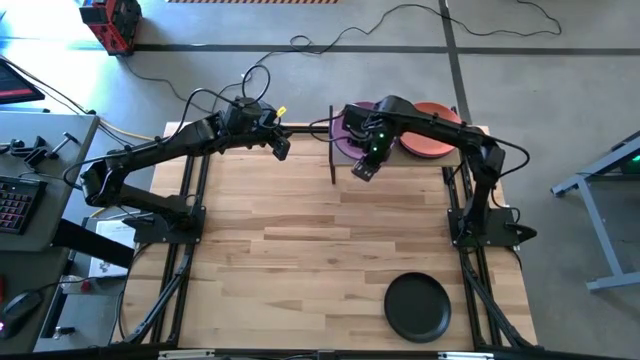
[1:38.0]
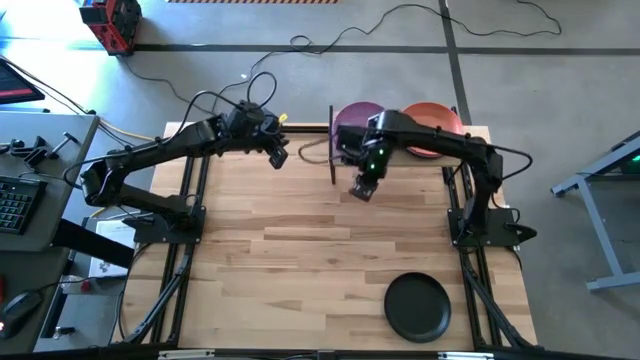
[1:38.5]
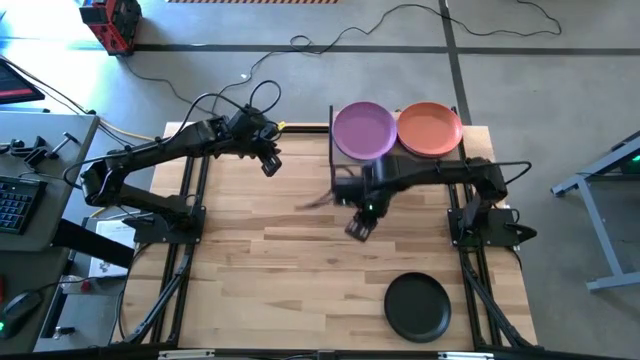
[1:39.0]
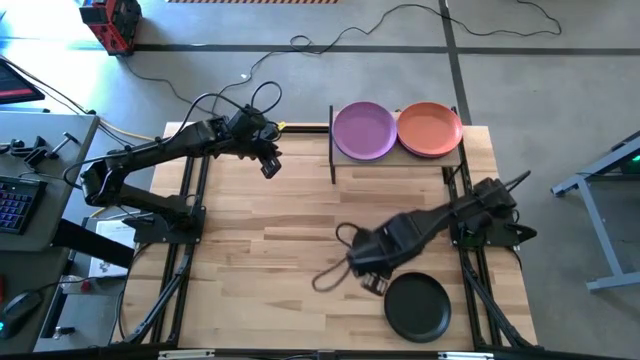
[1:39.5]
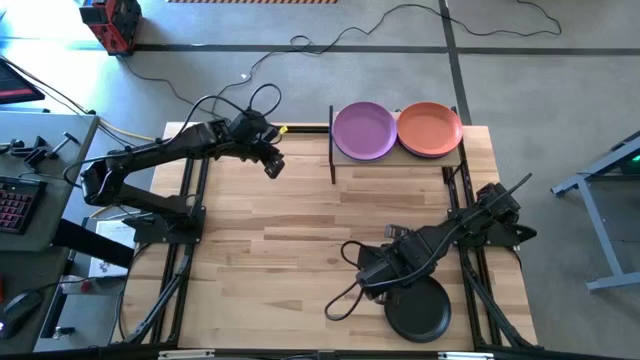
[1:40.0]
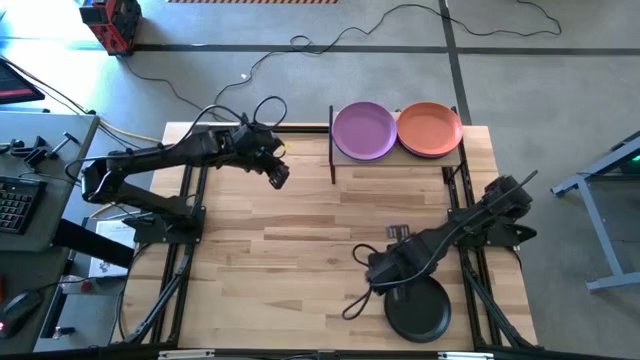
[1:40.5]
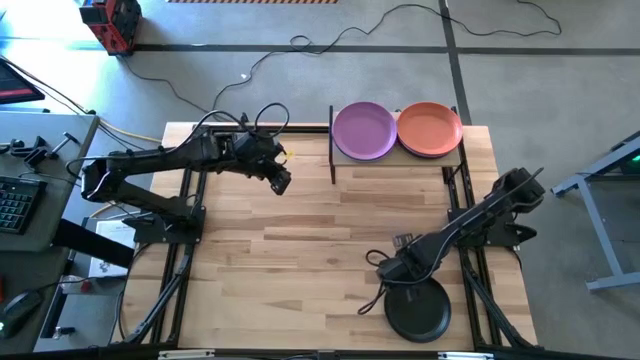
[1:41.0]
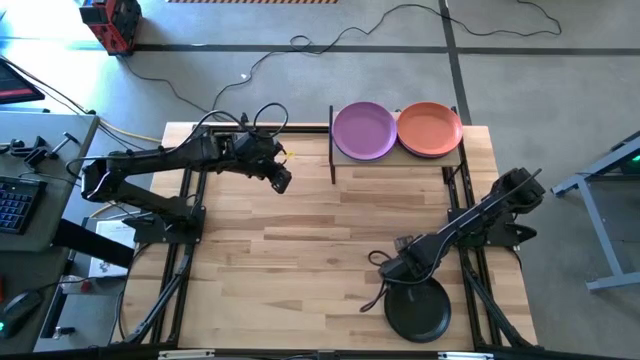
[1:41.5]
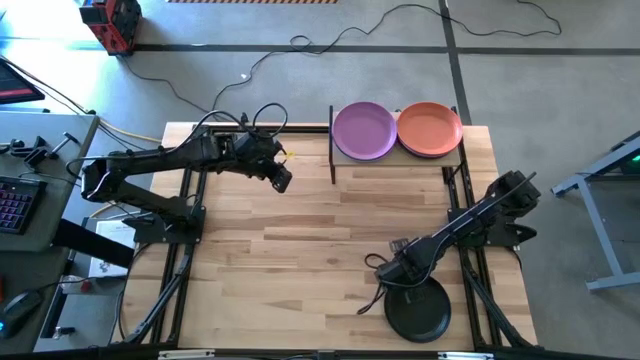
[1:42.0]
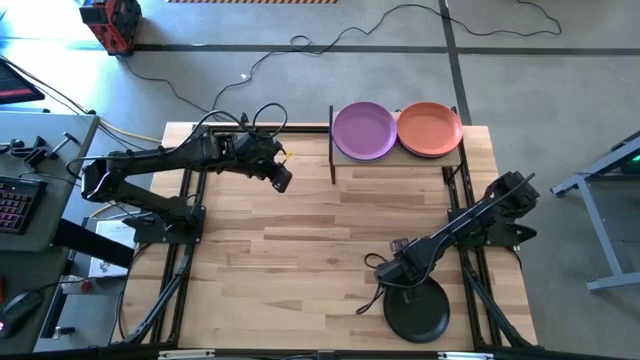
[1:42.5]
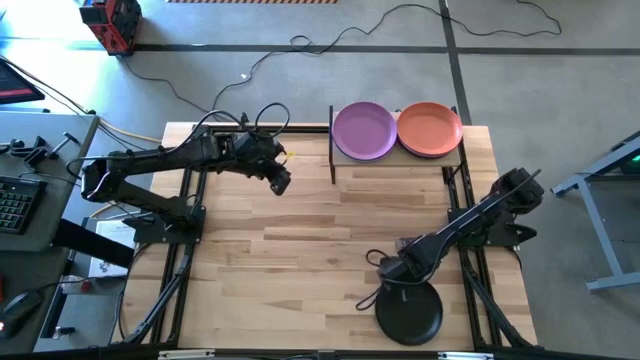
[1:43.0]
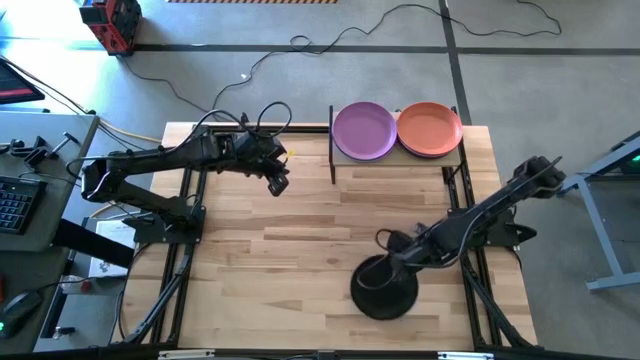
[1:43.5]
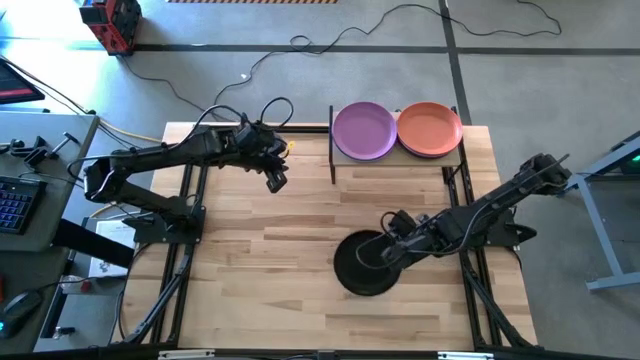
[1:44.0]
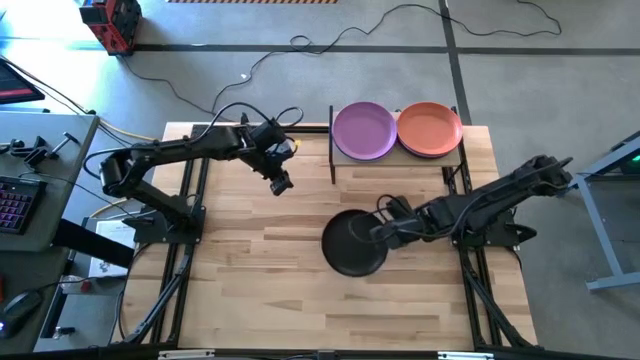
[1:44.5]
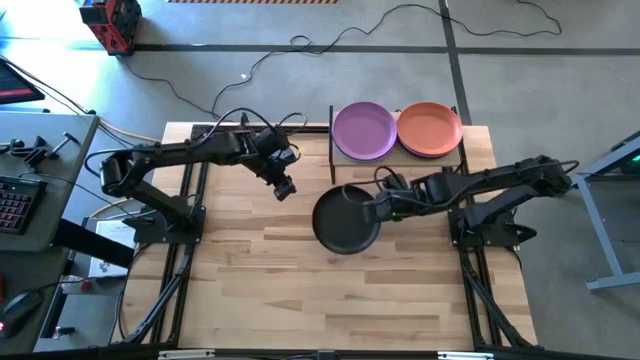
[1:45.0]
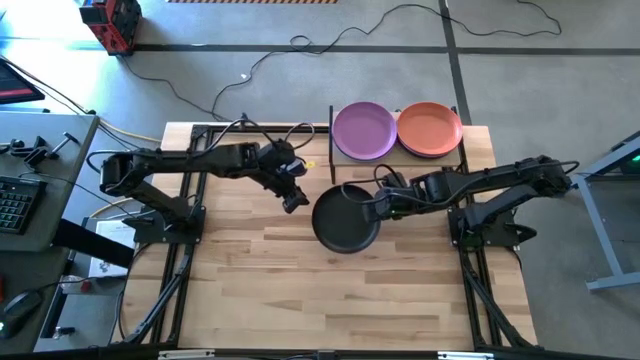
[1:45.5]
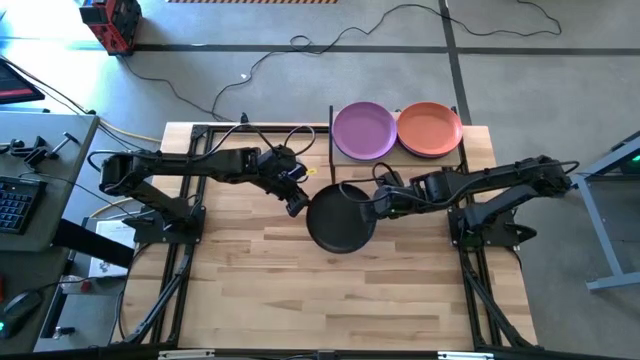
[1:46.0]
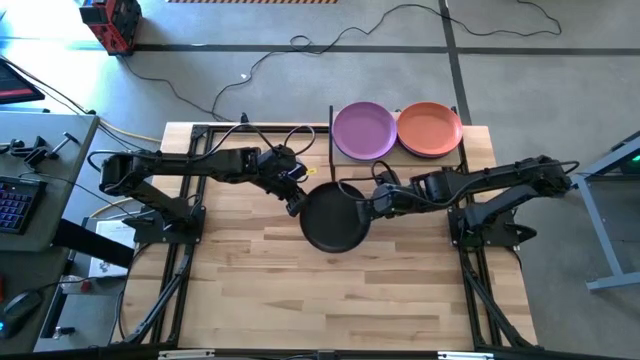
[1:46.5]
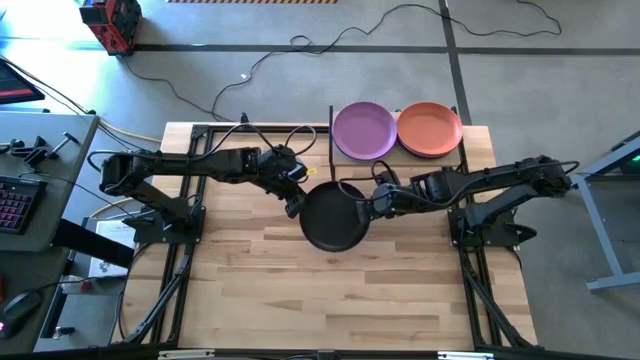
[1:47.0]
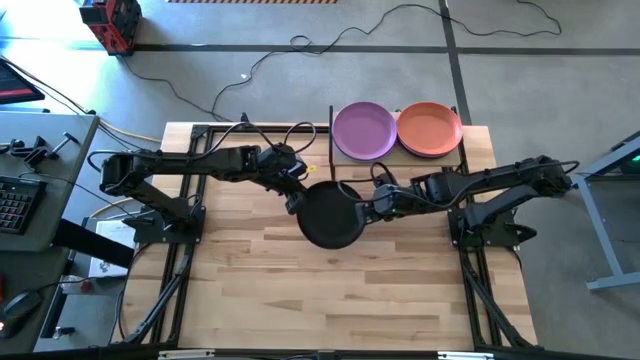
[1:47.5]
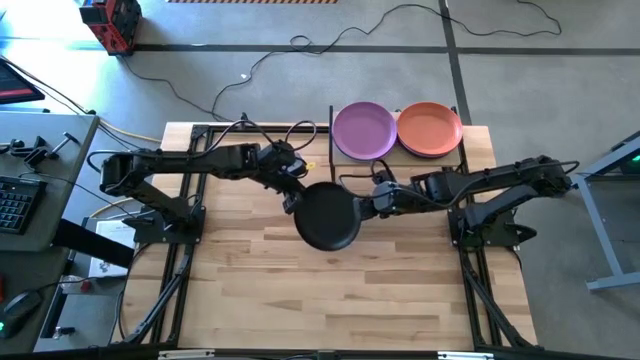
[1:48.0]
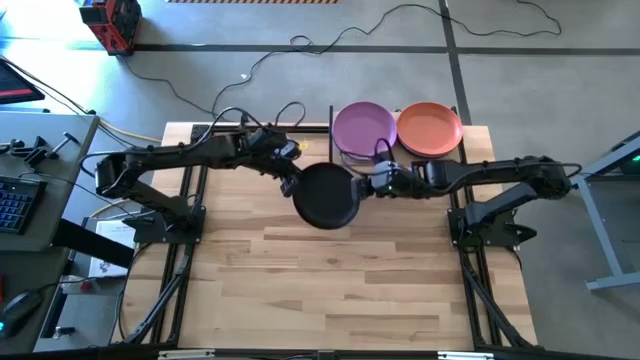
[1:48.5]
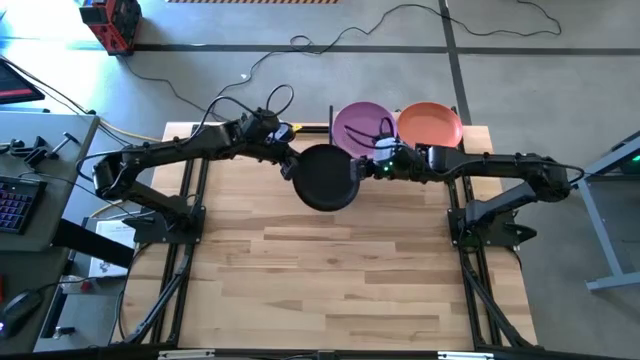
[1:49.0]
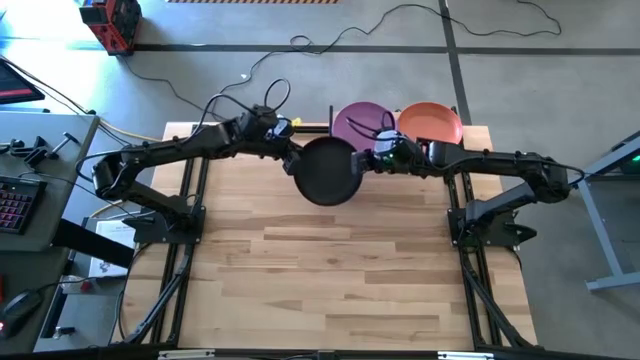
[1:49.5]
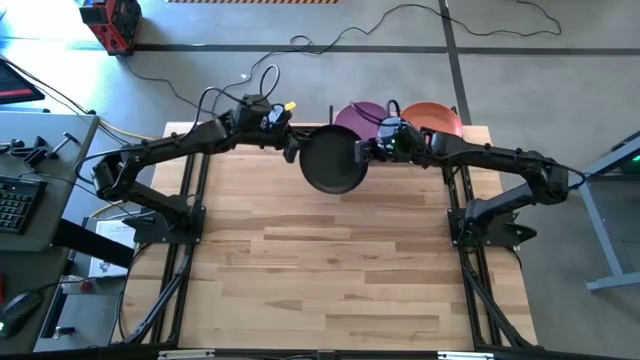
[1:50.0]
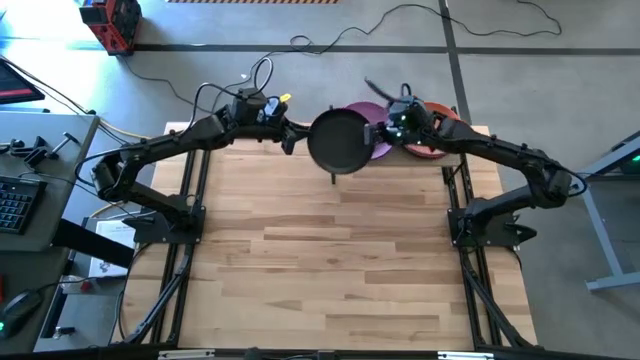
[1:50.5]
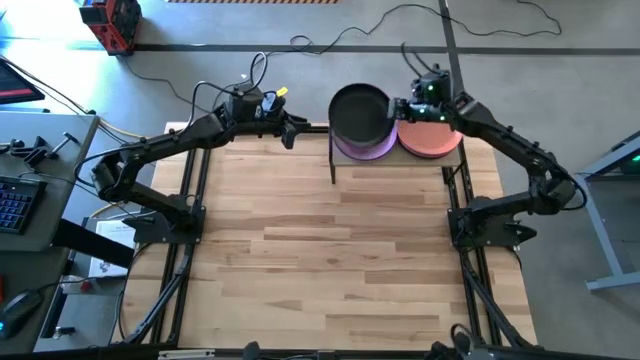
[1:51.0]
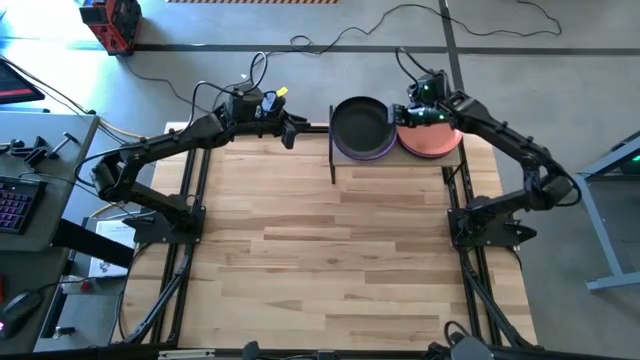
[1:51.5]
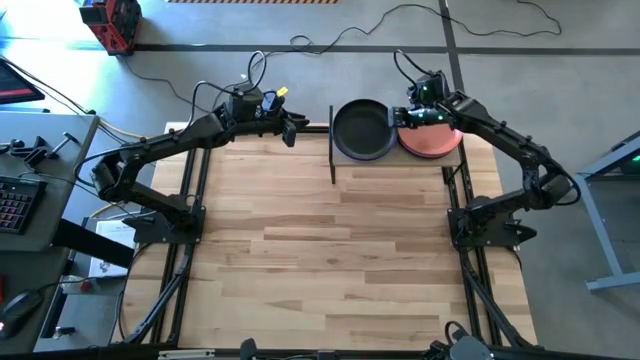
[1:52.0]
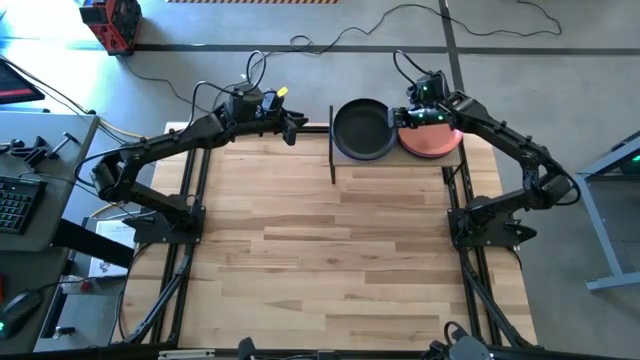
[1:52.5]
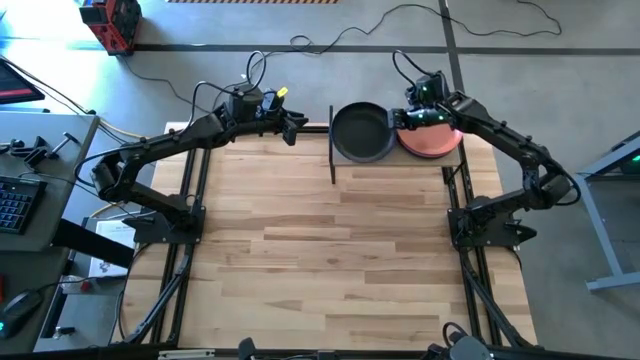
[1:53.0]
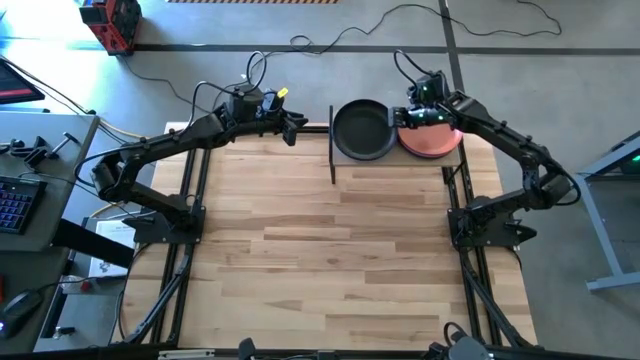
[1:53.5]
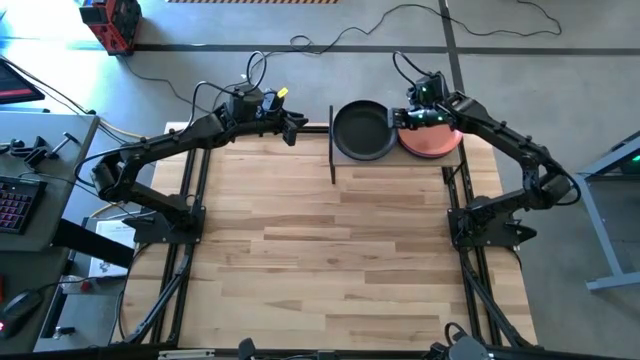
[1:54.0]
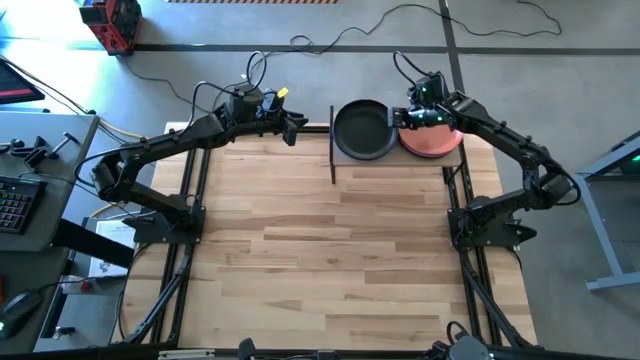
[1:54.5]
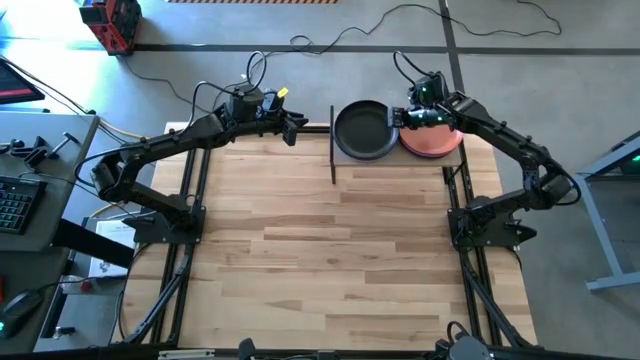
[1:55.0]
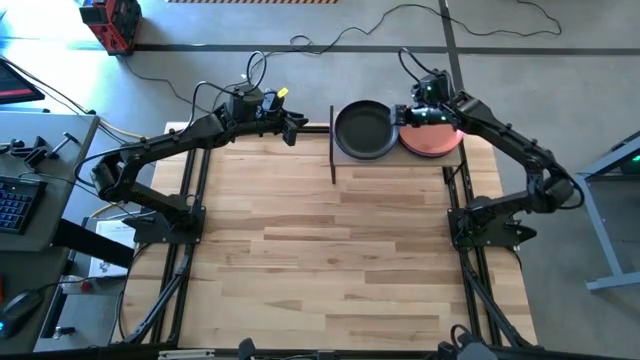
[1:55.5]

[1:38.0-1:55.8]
Task: Place and stack plates onto a shelf
Stack the black plate on top of the purple plate on the shelf

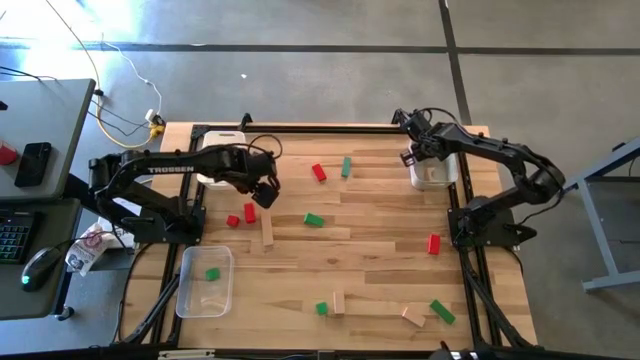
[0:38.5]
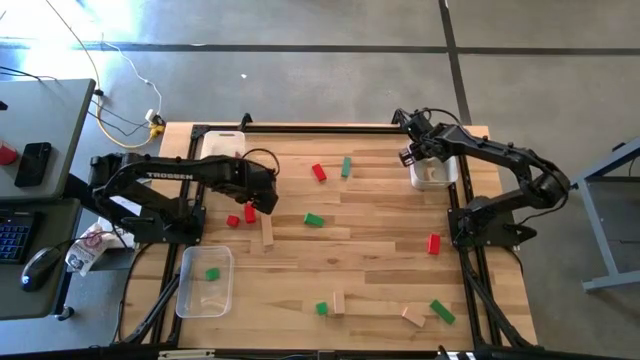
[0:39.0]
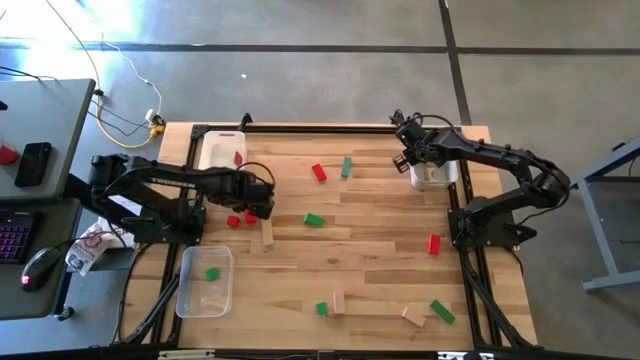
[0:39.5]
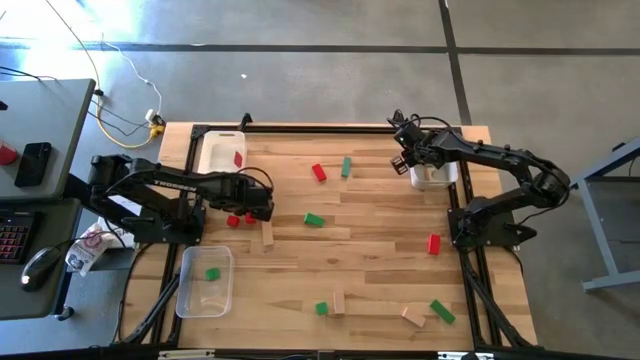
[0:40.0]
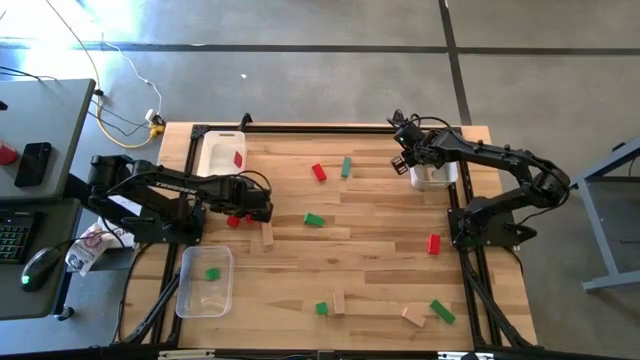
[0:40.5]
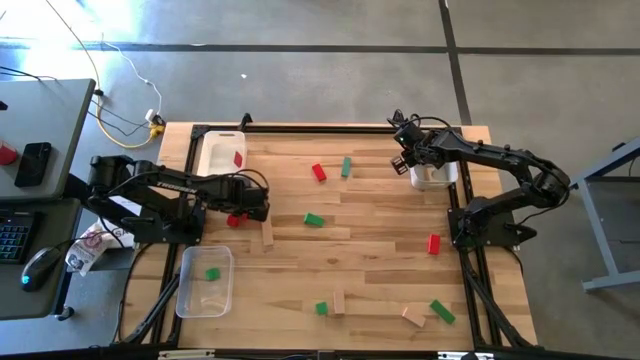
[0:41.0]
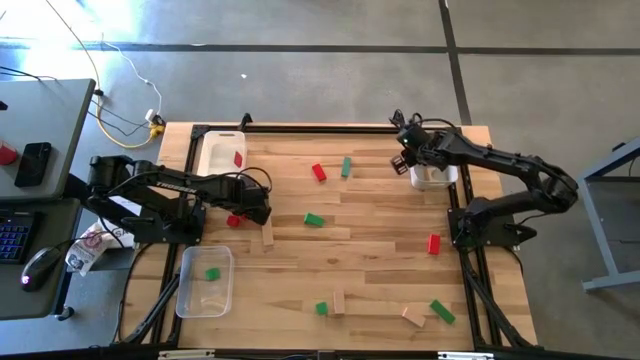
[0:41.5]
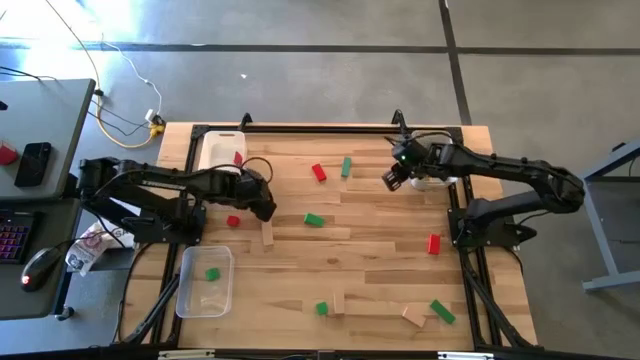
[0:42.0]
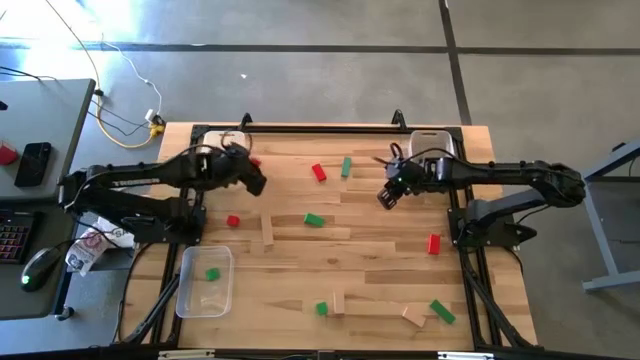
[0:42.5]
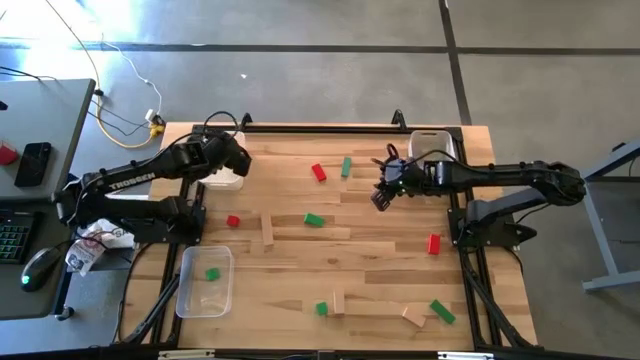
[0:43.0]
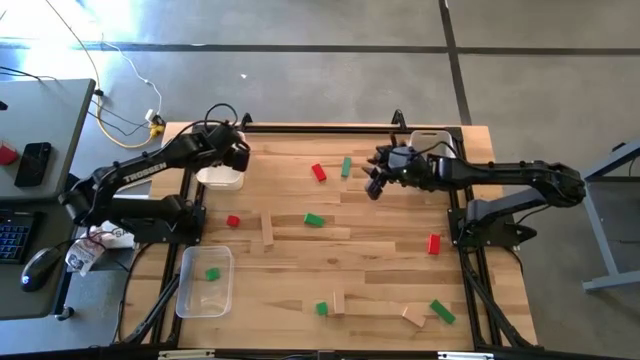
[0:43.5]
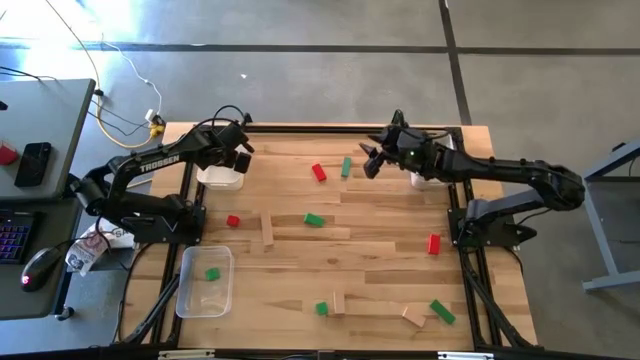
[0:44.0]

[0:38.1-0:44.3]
Task: Sort & place blocks by color
Put the red block into the white bin
